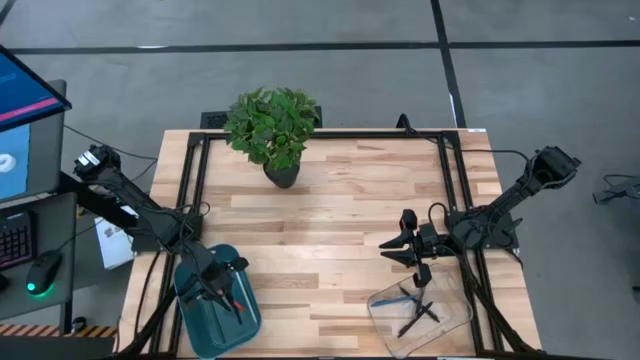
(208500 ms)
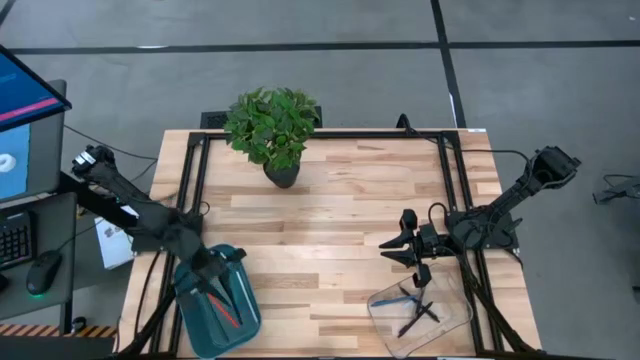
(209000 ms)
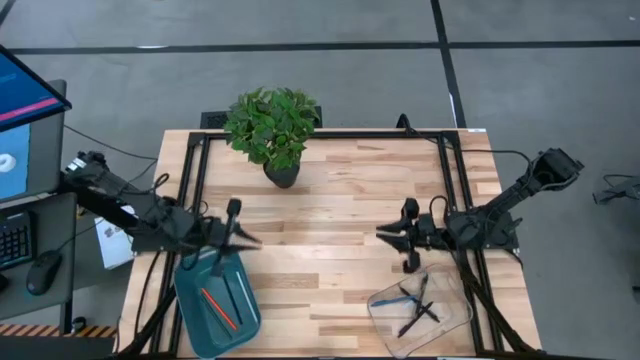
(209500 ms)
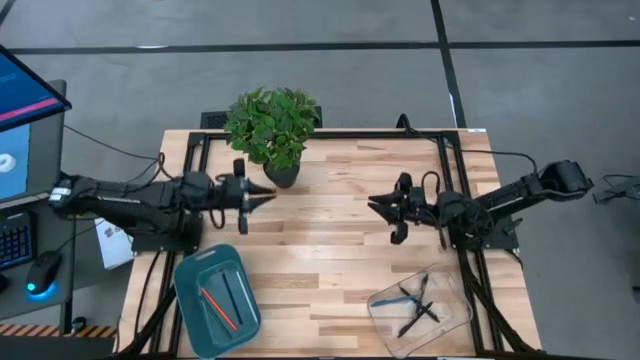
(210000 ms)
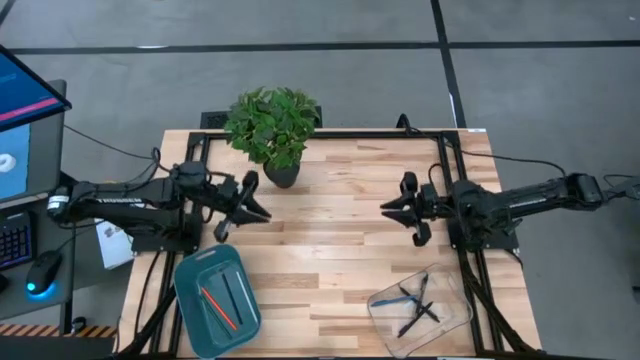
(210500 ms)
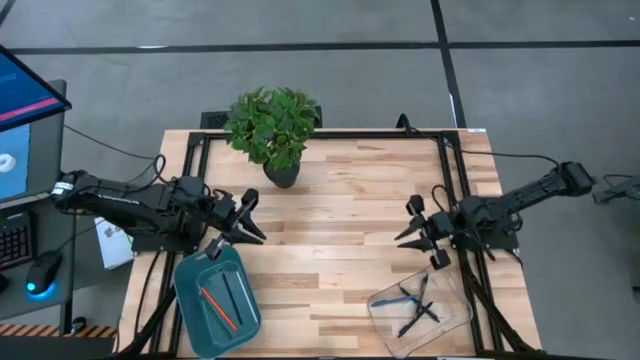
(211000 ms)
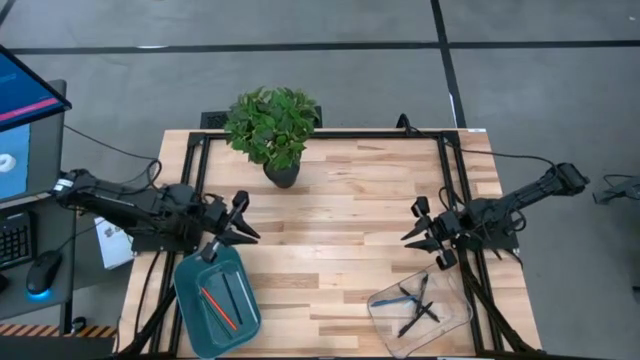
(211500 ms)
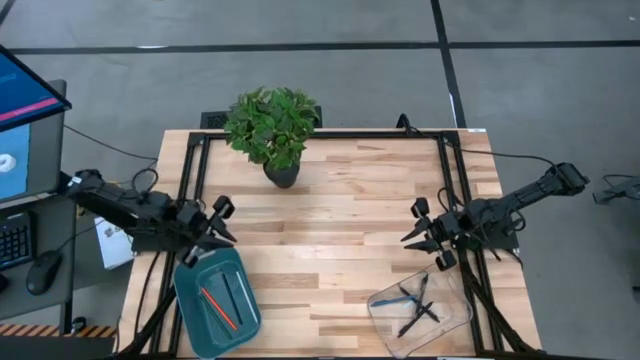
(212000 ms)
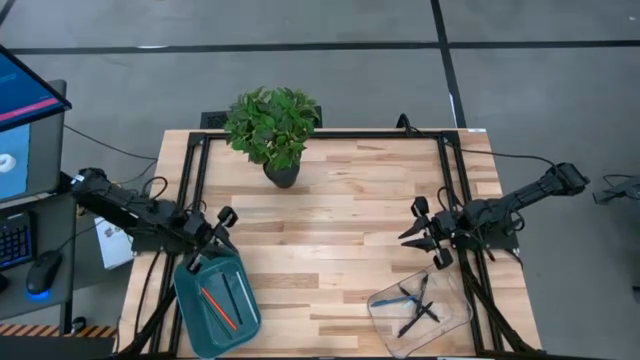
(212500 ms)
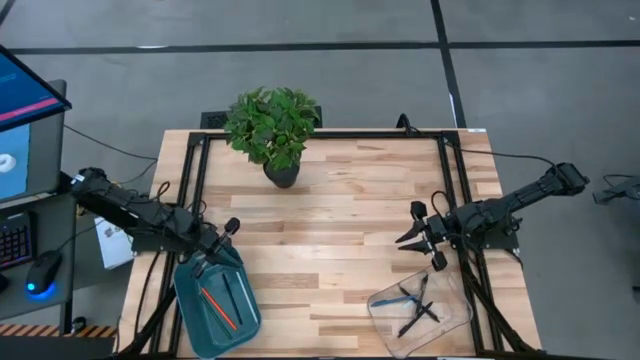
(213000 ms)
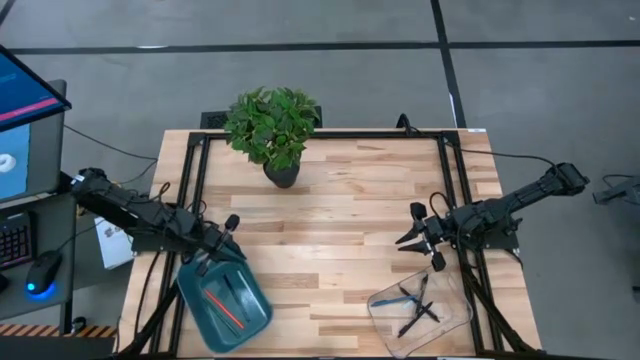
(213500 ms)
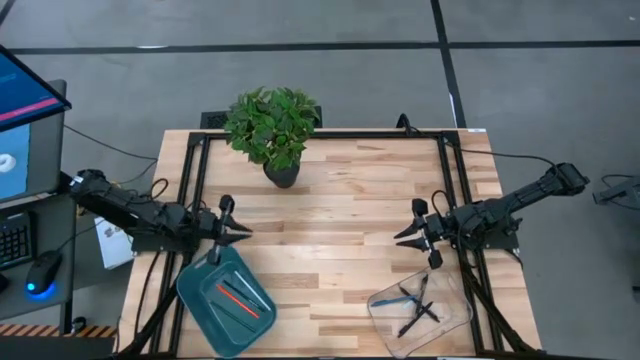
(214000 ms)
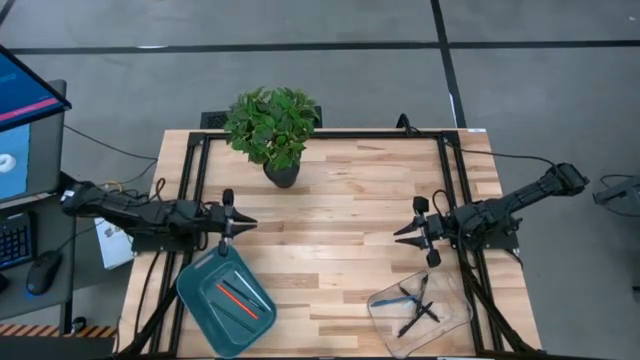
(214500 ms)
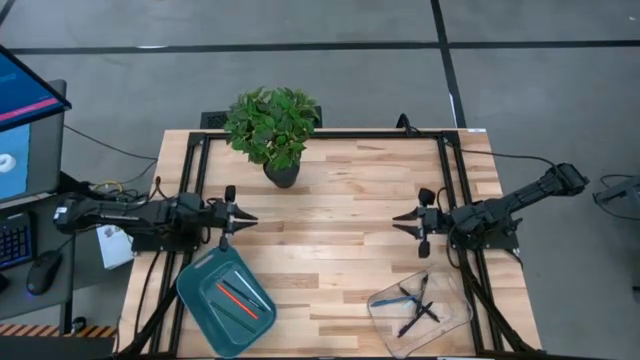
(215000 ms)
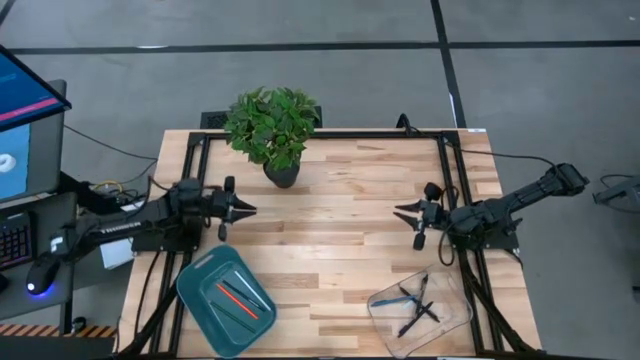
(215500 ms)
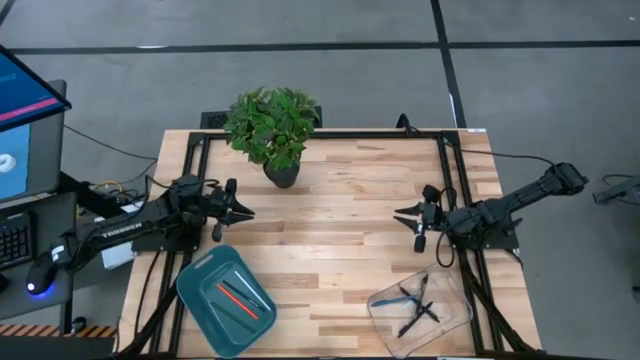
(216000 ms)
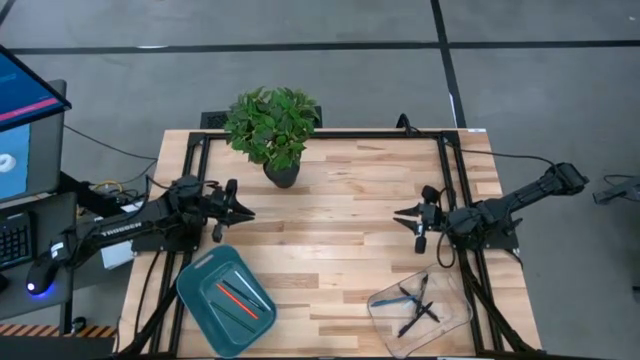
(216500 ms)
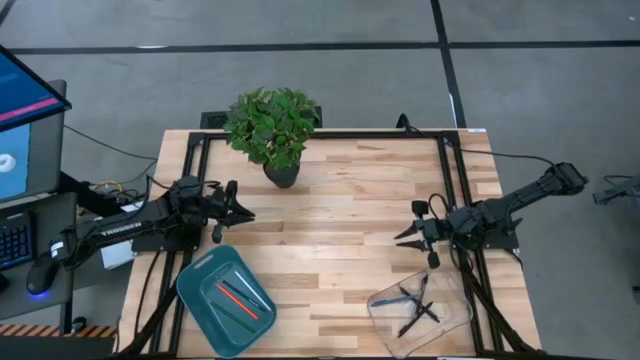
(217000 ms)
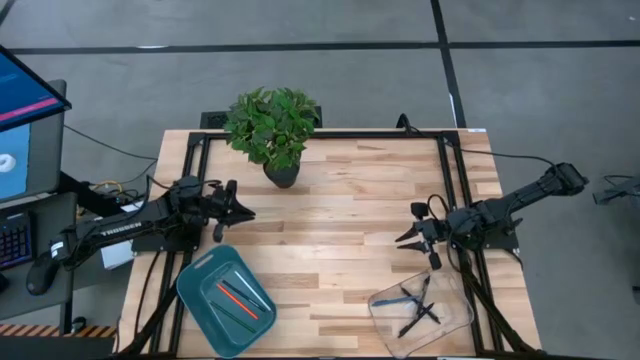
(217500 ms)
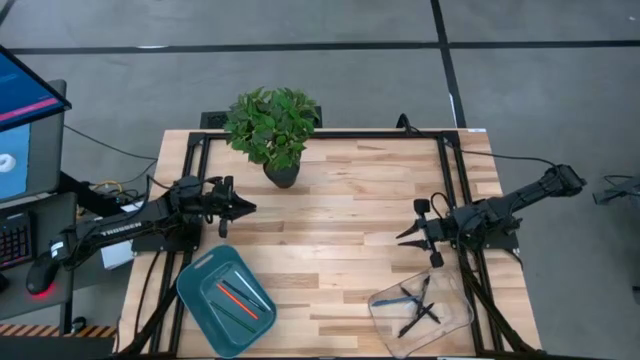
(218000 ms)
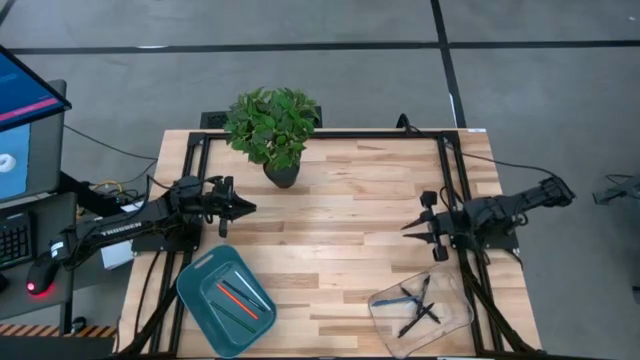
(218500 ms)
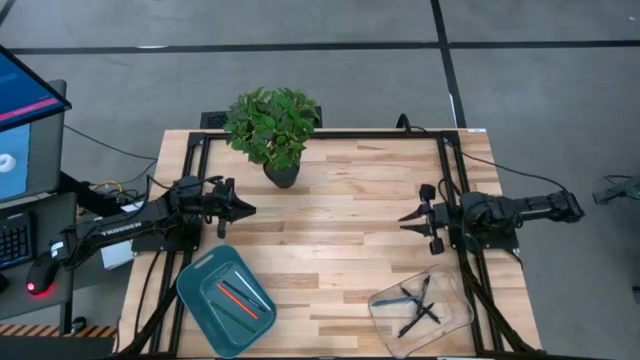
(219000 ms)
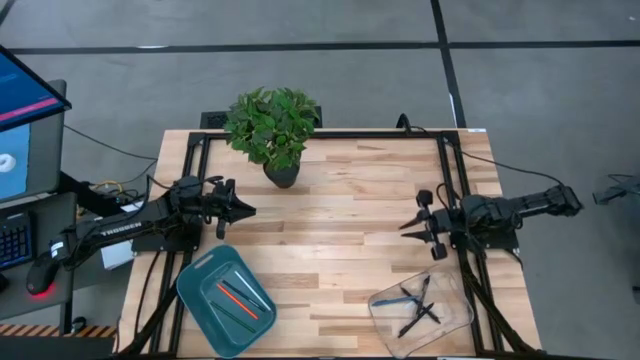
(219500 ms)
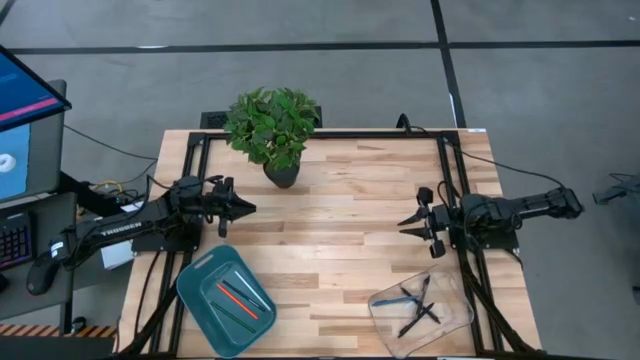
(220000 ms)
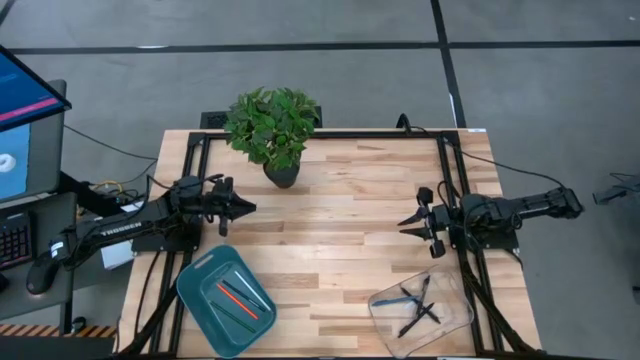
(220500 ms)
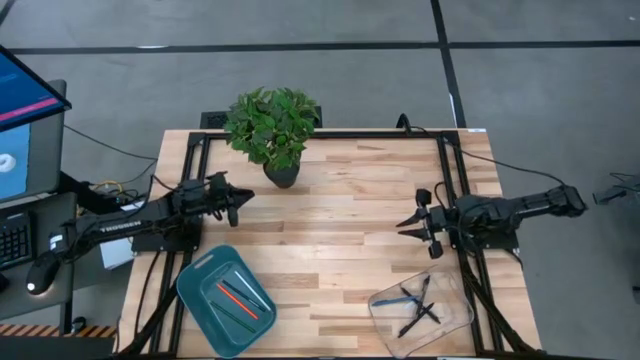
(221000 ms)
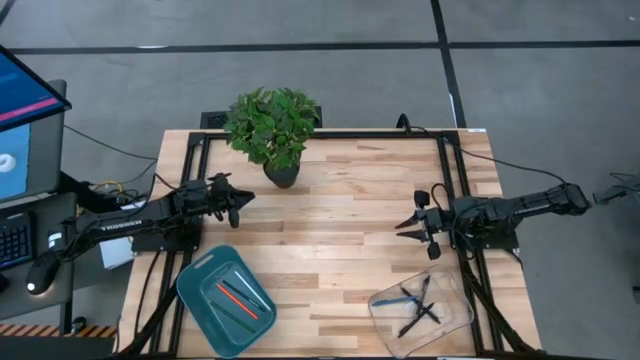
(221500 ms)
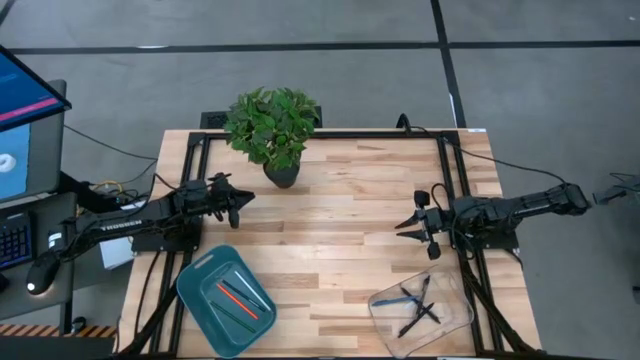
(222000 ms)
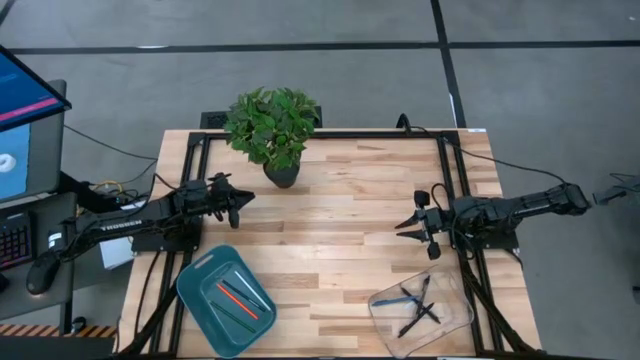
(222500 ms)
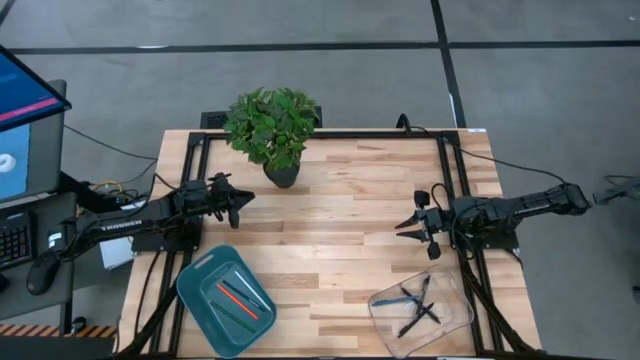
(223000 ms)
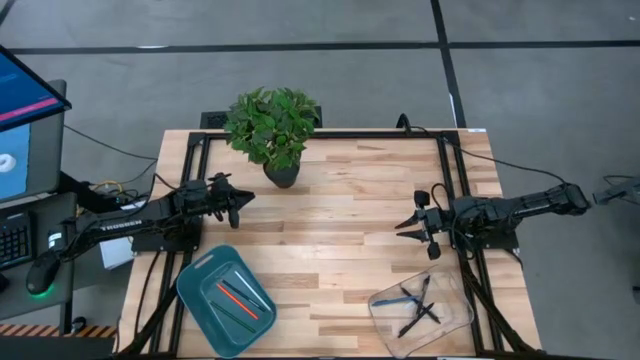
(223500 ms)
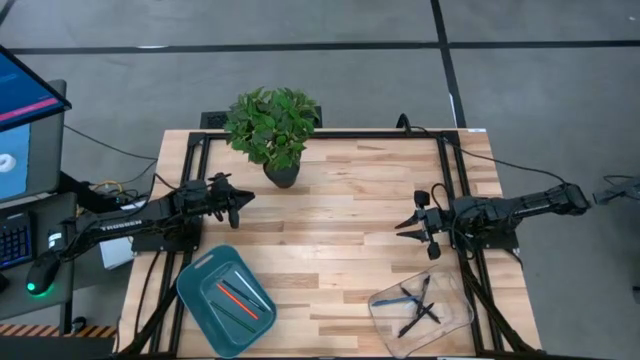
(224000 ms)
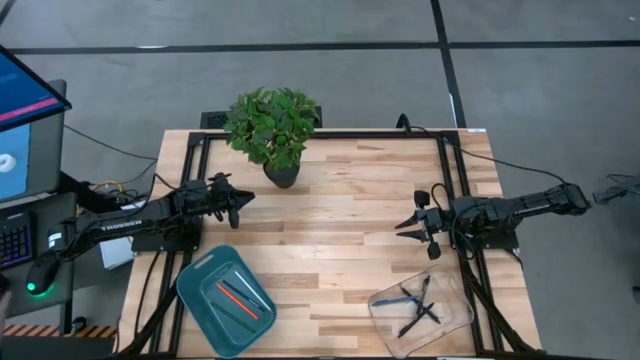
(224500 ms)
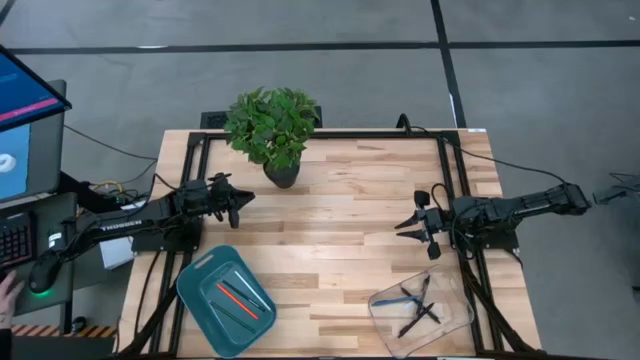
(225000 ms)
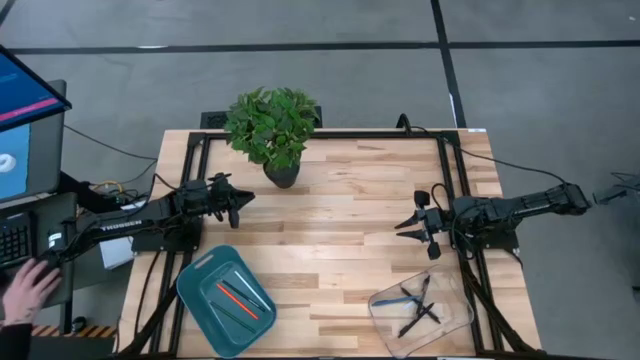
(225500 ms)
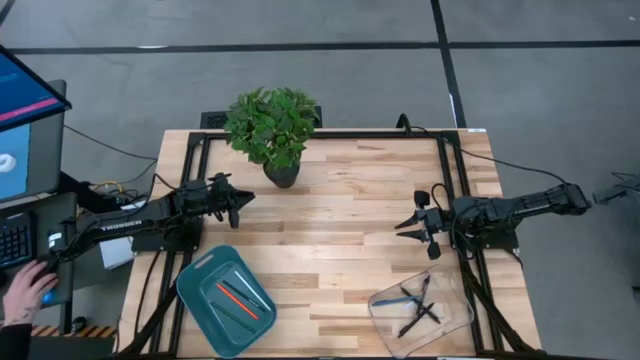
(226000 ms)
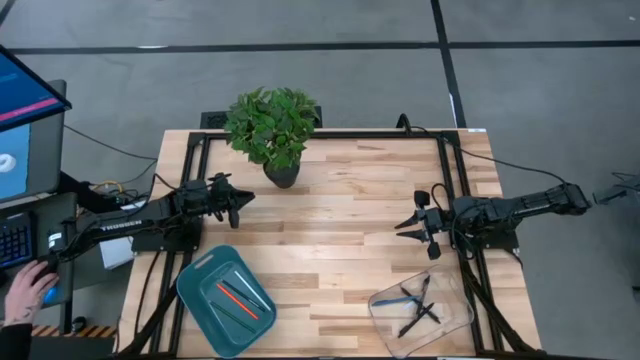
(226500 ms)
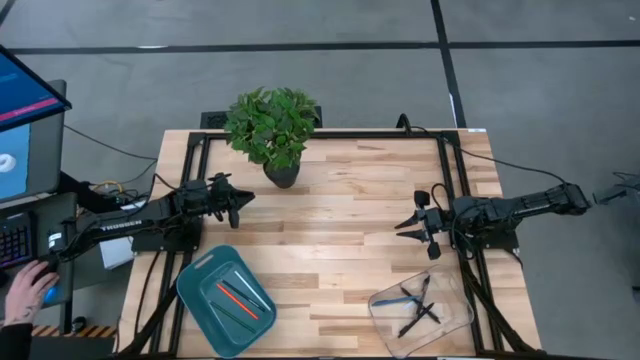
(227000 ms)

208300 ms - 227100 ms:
Task: Sort pens & pencils
Return to Home Position

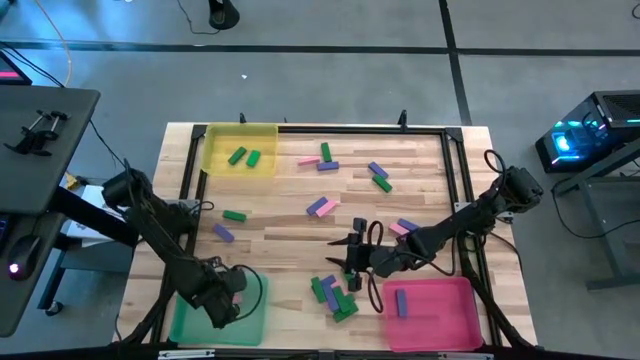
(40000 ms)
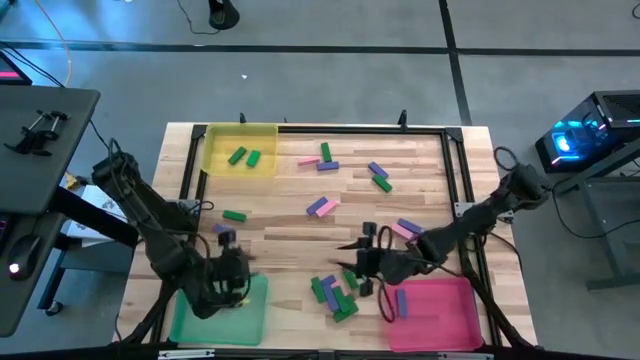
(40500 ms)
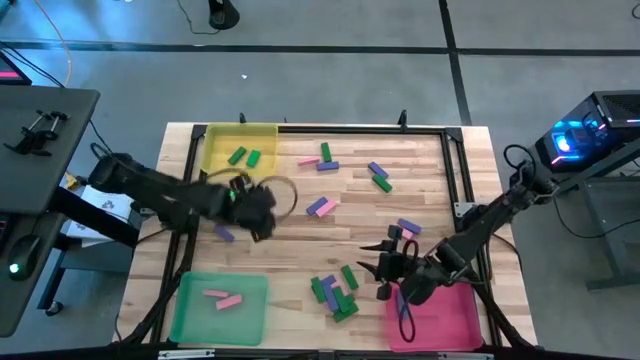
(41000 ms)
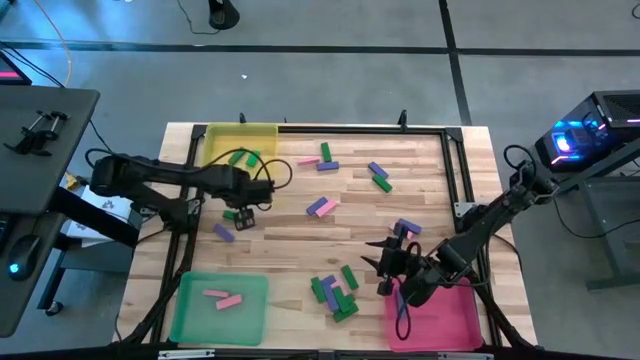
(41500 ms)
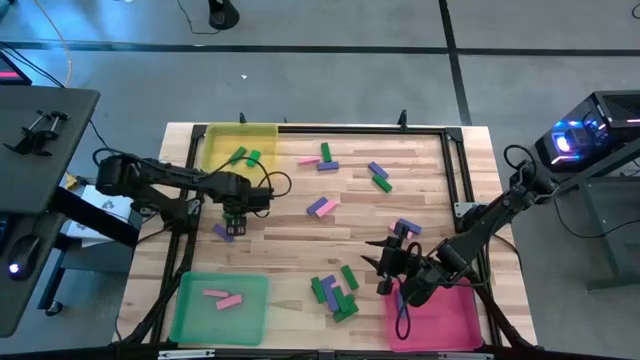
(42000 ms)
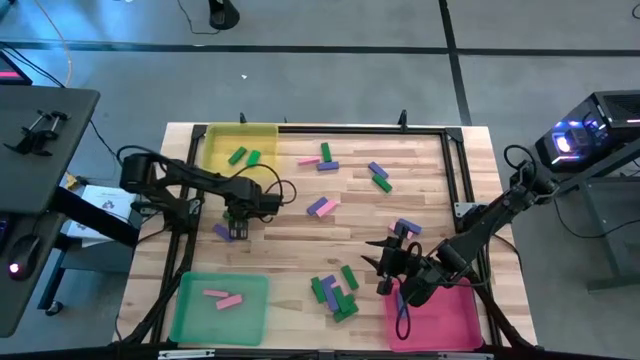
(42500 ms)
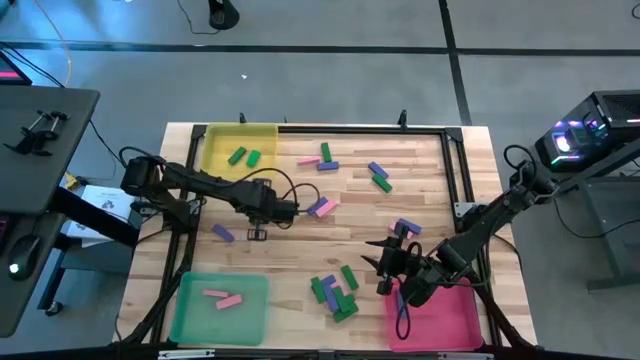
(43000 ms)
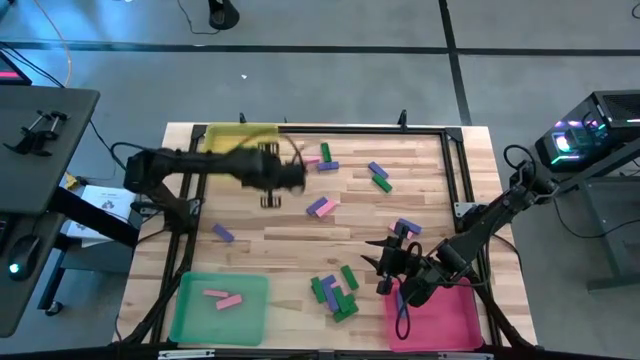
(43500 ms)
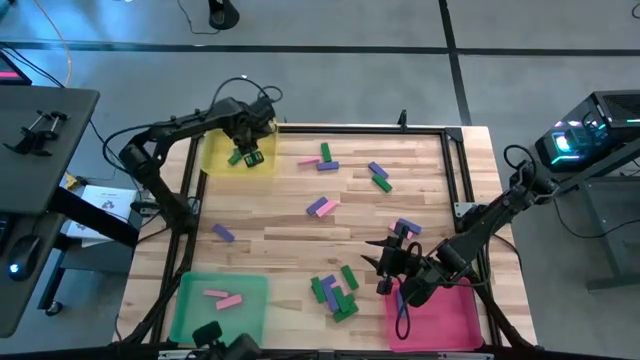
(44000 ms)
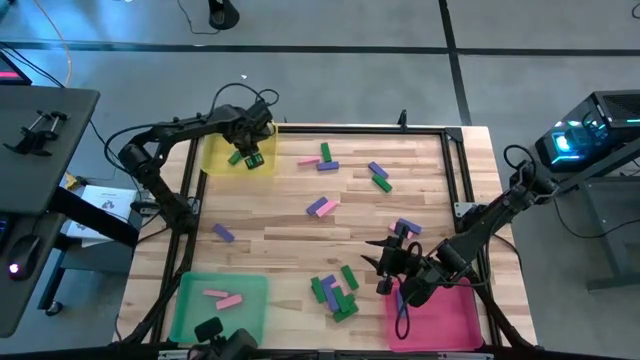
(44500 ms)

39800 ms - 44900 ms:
Task: Sort blocks
Put the green block into the yellow bin
